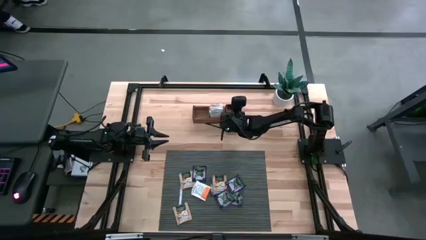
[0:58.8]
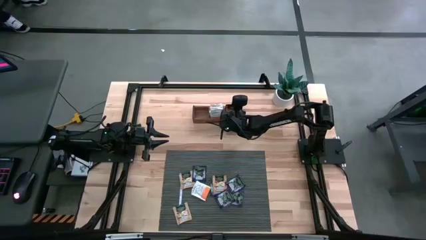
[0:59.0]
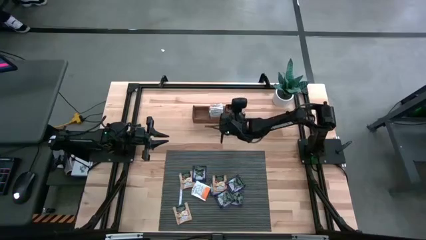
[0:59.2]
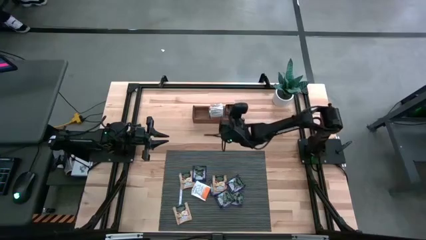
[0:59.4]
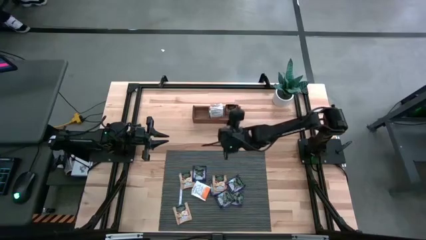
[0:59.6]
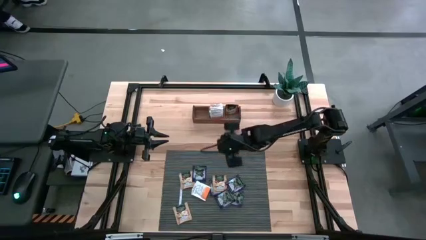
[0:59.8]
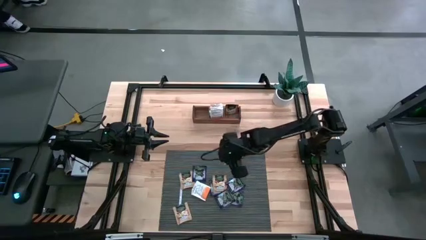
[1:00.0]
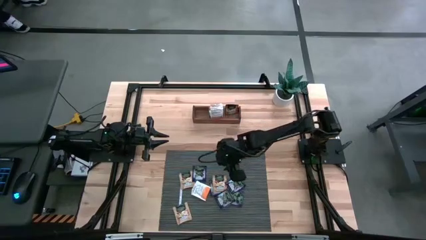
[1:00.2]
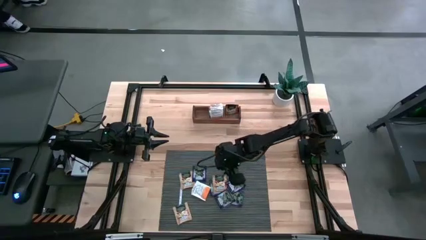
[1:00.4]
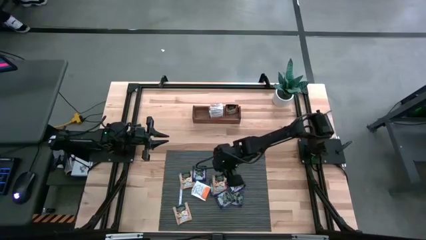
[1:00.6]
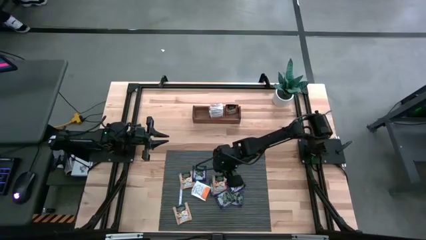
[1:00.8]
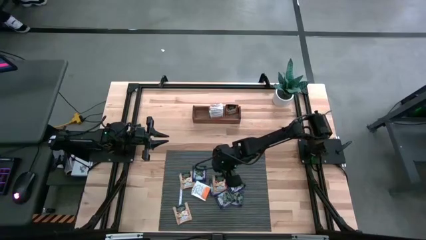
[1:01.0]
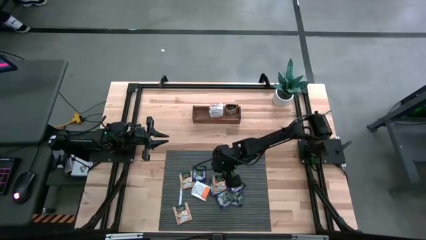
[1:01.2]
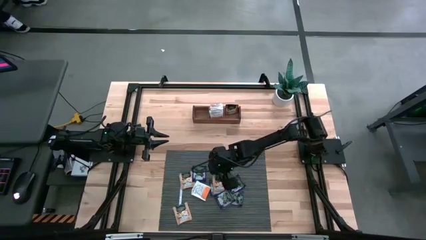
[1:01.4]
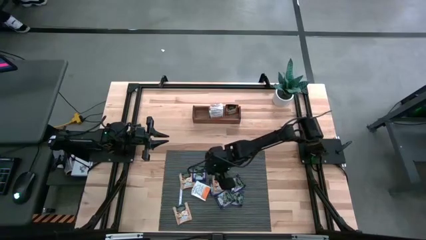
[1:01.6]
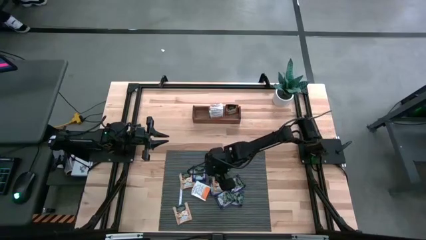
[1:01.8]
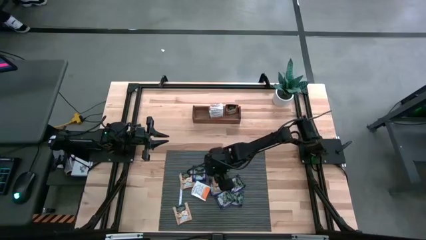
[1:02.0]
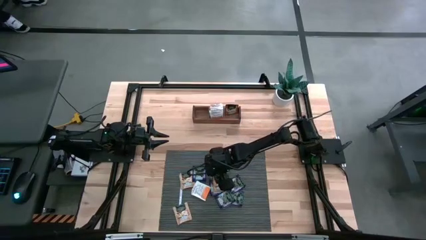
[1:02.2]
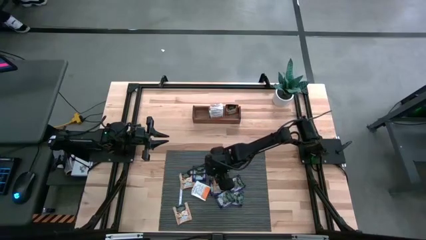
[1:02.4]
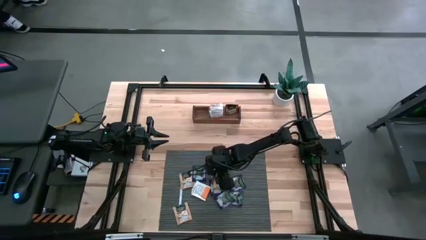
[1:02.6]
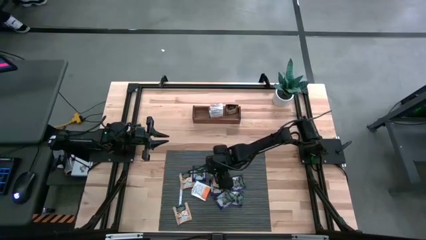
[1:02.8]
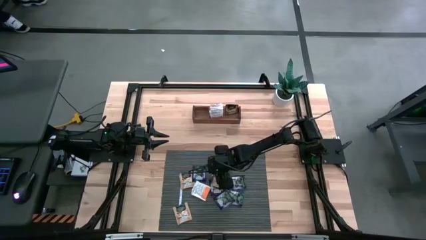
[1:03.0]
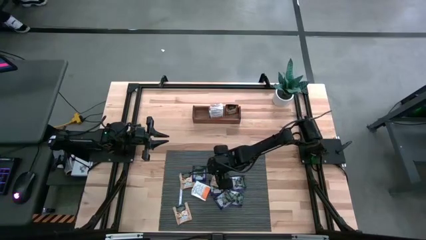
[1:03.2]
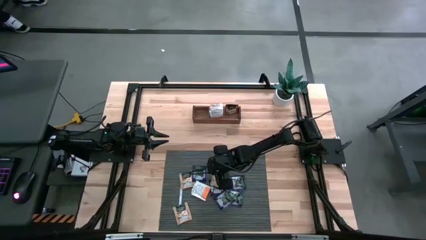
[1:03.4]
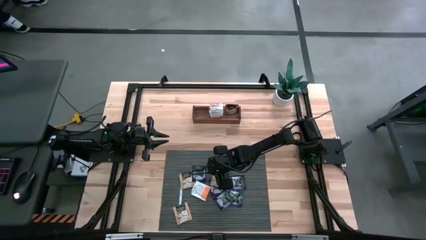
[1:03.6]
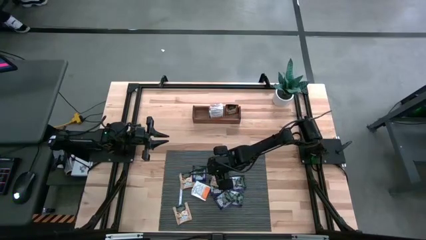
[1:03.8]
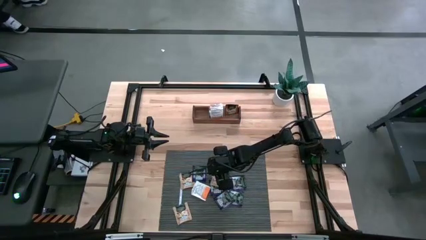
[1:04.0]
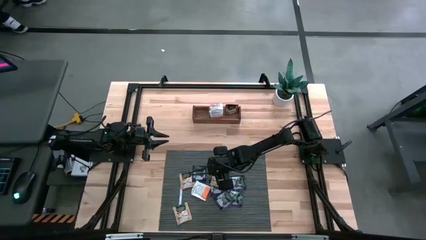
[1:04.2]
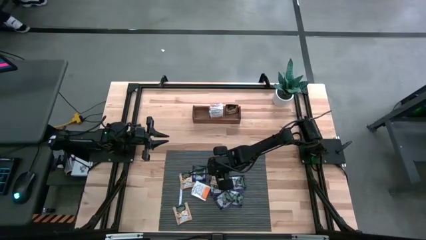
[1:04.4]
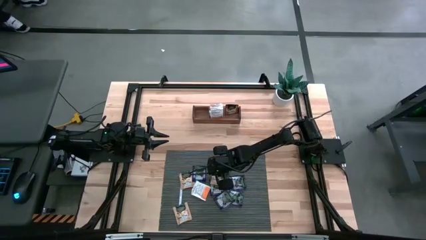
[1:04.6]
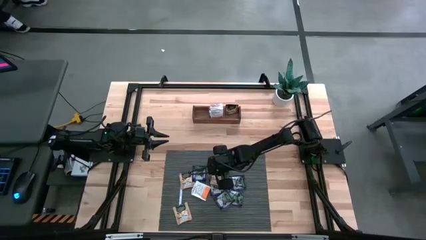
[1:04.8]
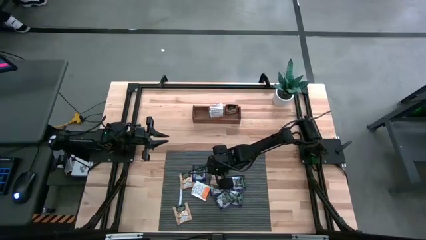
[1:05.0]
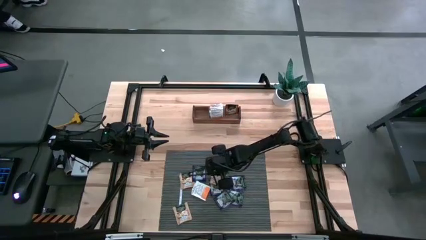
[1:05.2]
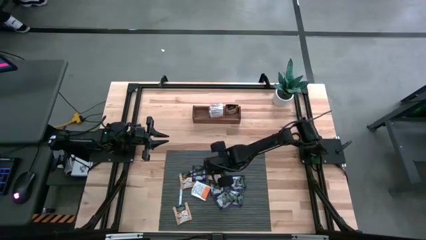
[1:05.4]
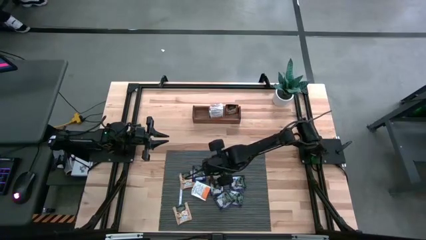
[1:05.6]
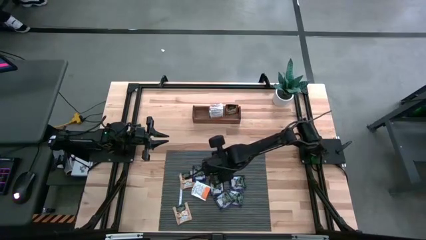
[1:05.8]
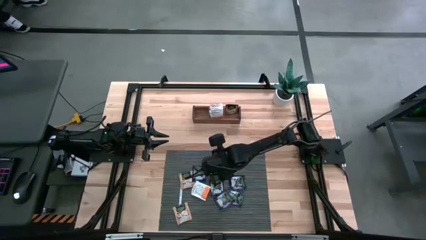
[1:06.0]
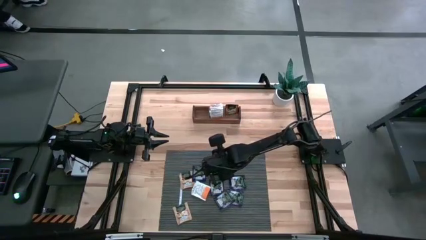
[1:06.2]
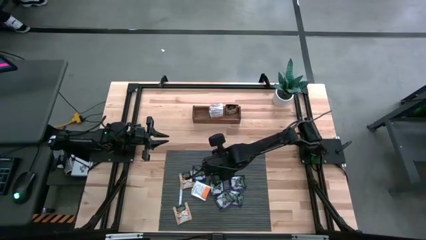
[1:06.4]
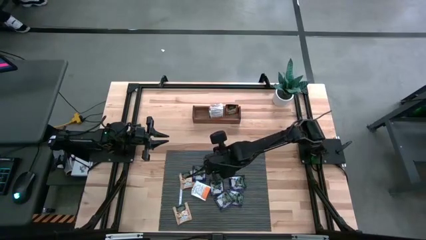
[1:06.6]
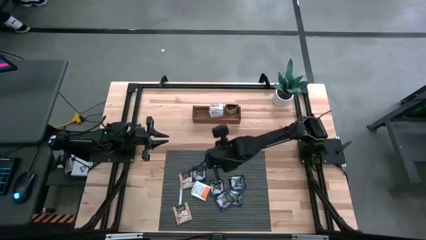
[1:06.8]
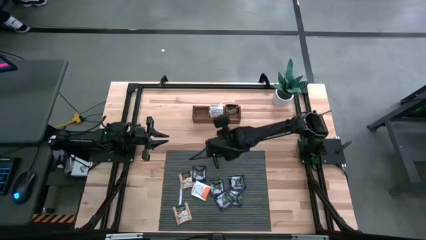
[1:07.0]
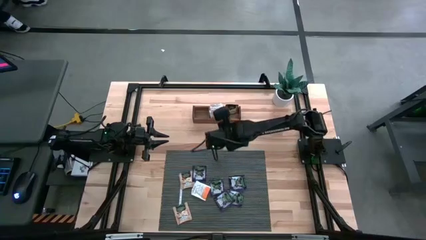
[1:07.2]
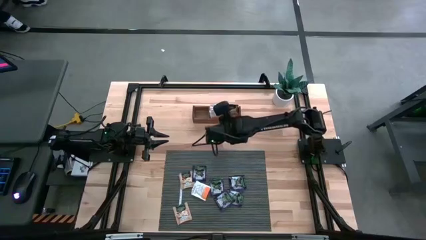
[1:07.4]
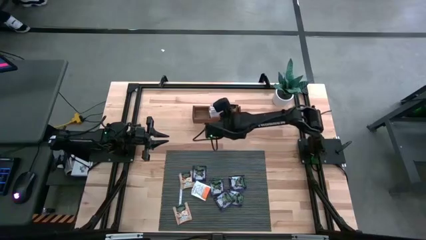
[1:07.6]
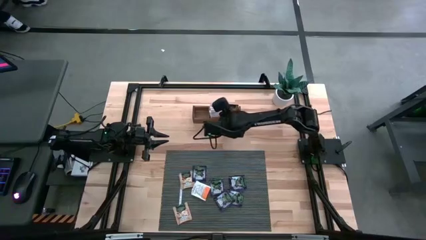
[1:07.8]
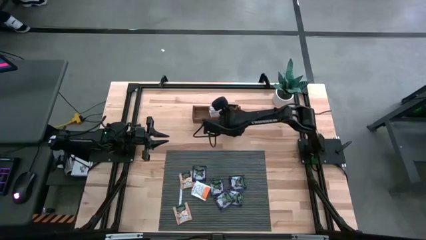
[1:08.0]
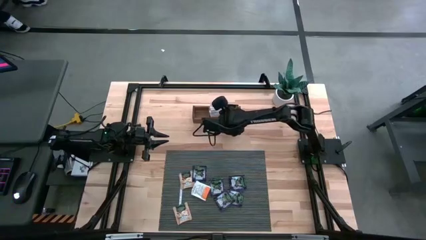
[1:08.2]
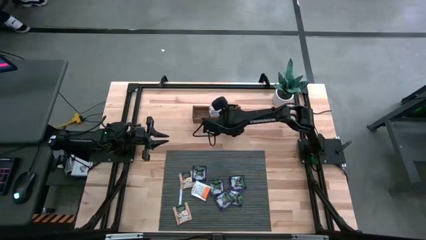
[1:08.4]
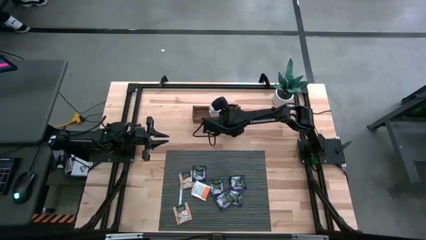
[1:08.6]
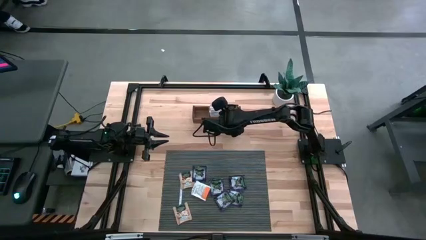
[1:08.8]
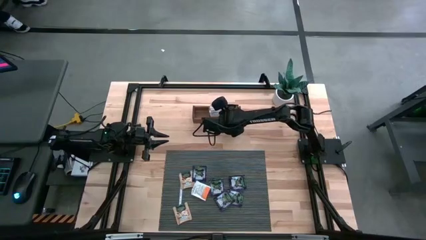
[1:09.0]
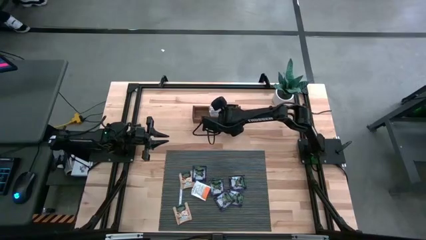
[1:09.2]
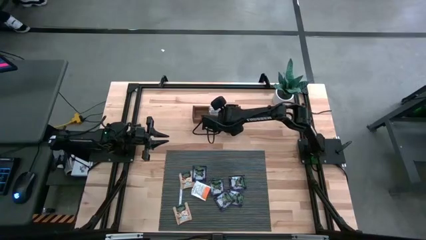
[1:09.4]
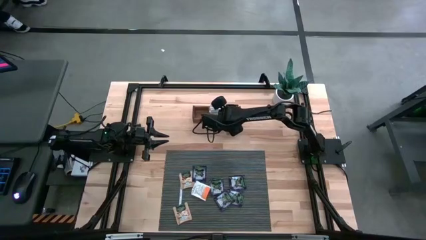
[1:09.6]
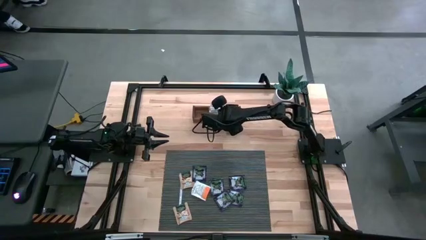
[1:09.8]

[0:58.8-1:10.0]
Task: Pick & Place Tea
Put the light brown tea bag into the right compartment of the wooden organizer

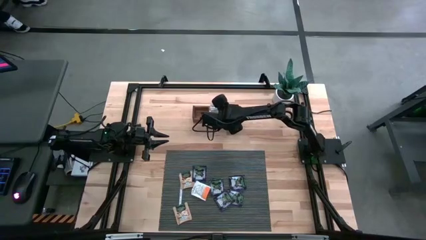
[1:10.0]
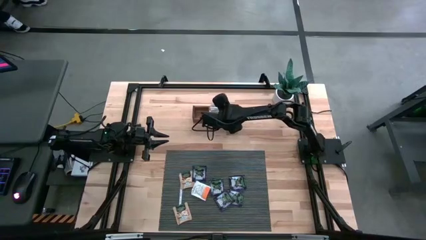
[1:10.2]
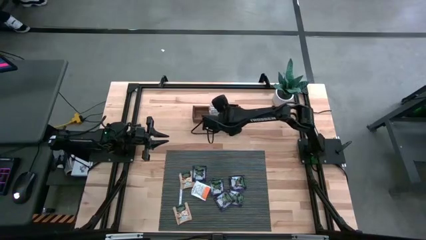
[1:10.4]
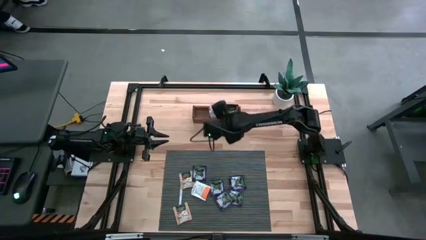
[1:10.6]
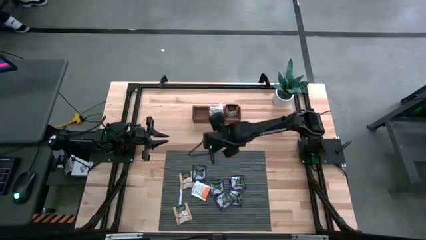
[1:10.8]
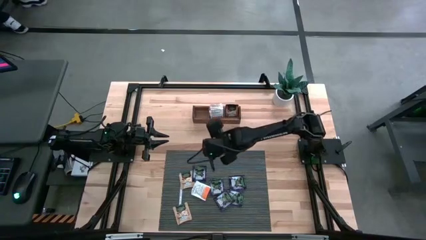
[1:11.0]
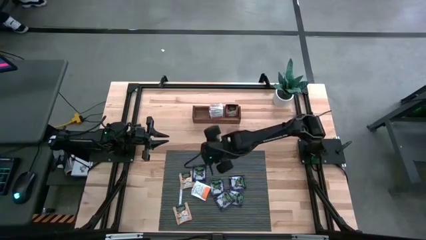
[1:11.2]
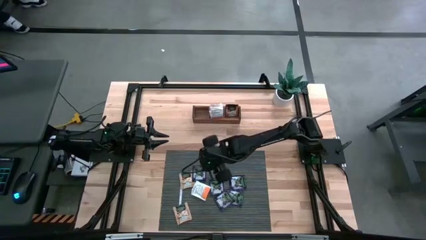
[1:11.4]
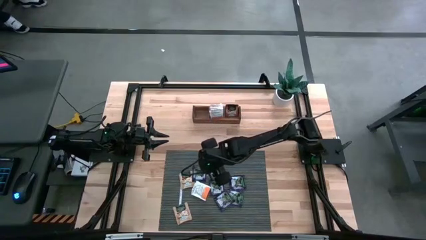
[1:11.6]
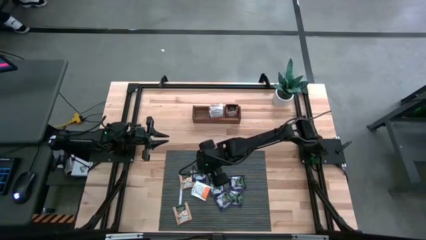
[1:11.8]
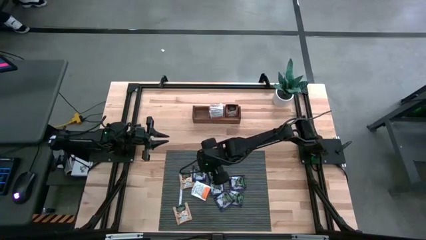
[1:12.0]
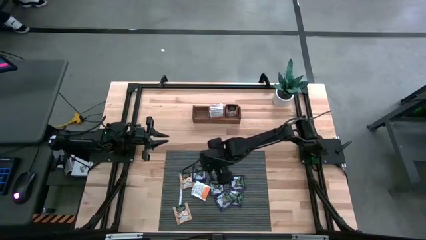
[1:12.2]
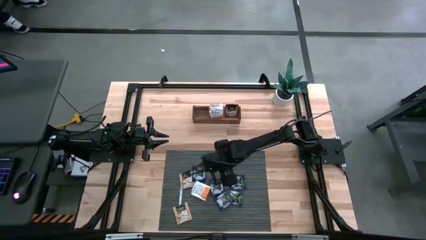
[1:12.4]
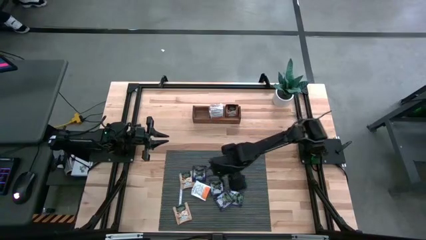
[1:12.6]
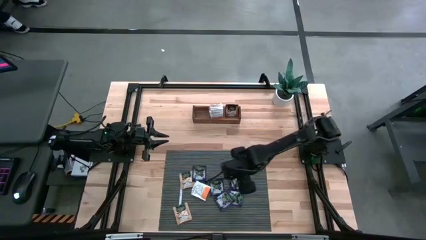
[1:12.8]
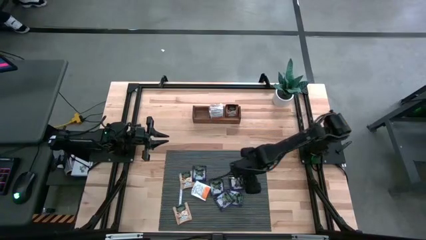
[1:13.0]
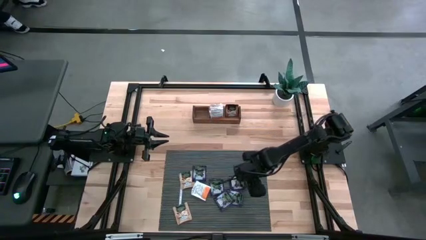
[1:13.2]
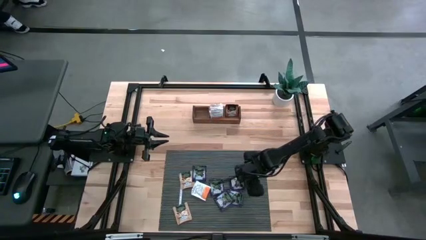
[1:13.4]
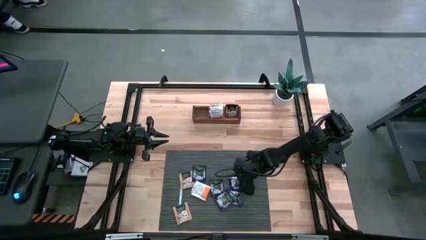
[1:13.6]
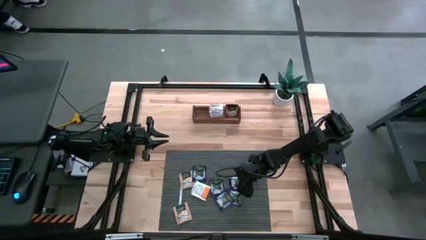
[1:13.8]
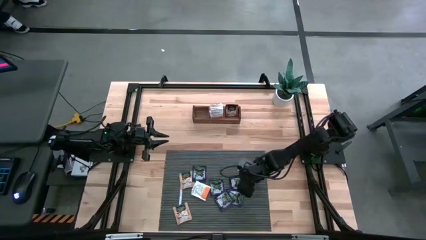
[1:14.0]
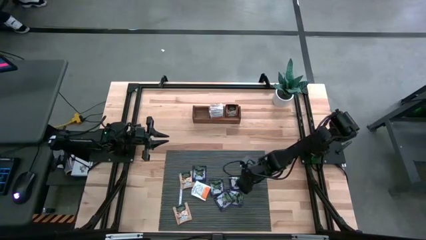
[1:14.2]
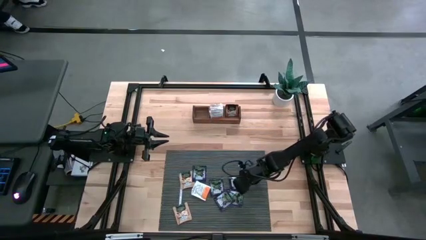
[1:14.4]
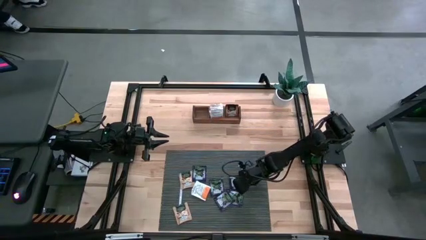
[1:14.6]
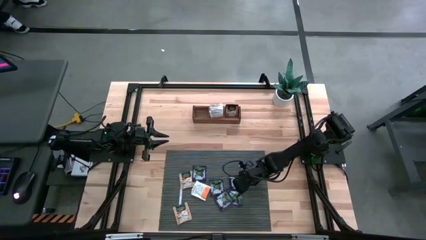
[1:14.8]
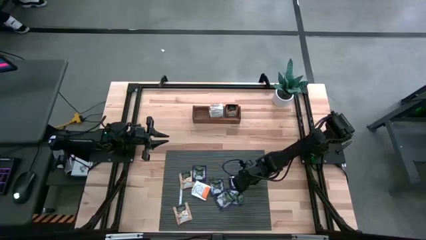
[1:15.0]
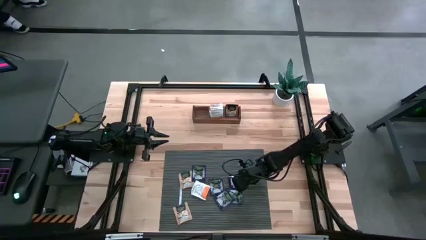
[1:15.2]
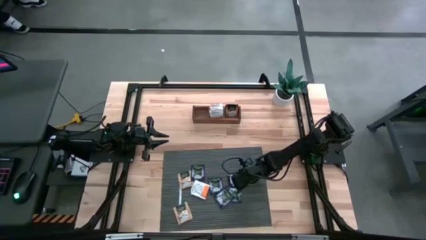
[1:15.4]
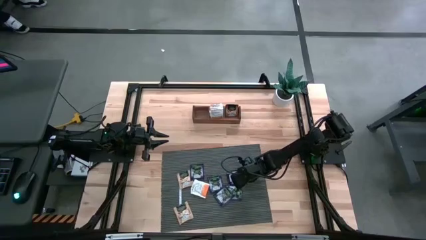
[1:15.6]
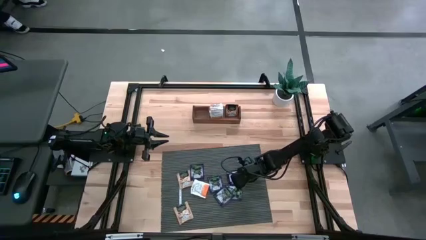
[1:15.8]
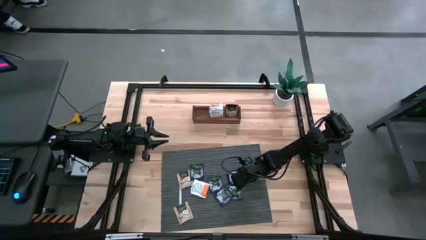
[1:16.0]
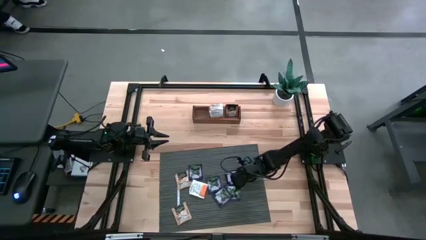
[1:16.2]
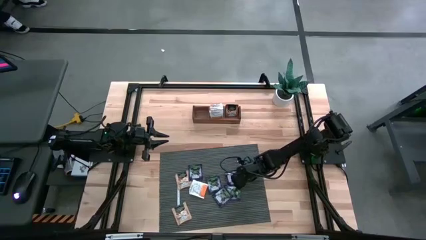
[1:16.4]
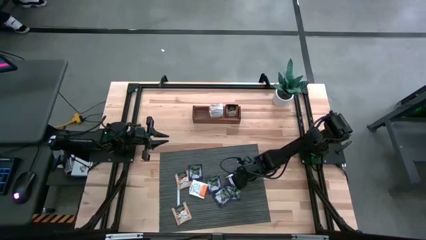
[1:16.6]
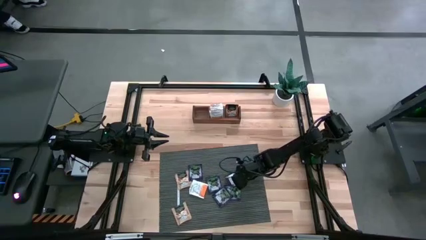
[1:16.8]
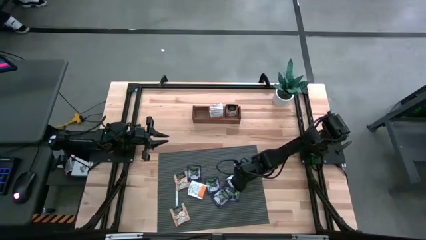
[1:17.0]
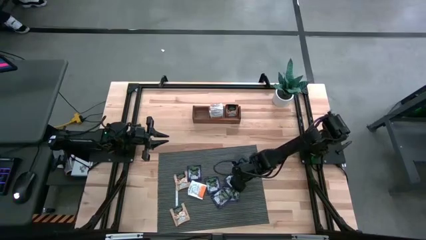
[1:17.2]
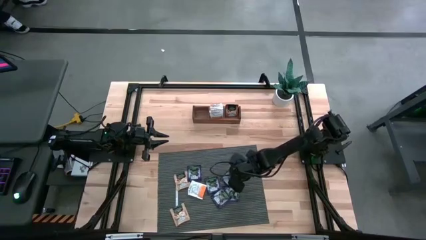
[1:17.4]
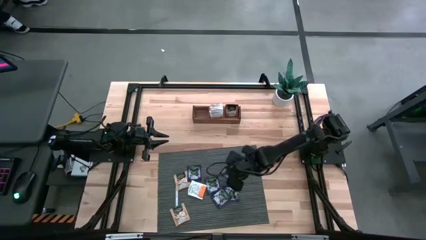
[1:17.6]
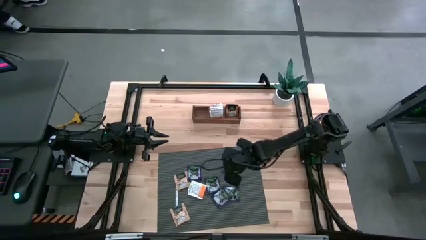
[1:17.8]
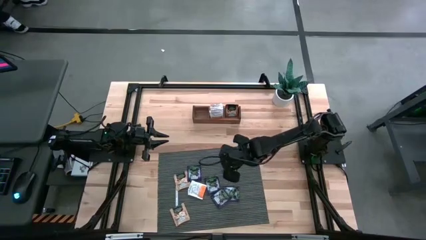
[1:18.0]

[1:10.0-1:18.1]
Put the purple tea bag into the left compartment of the wooden organizer
